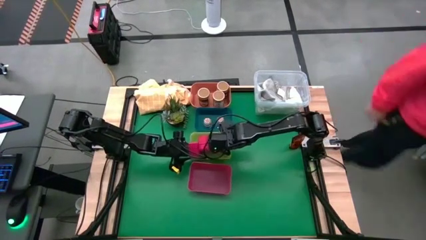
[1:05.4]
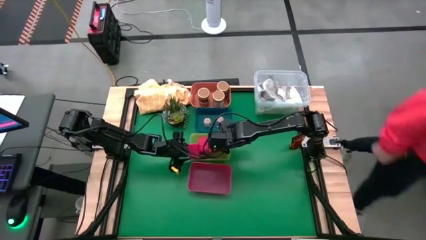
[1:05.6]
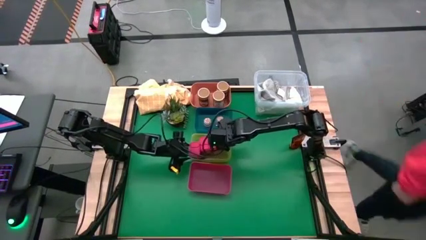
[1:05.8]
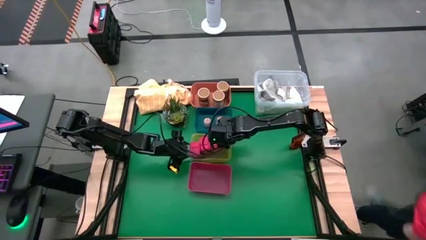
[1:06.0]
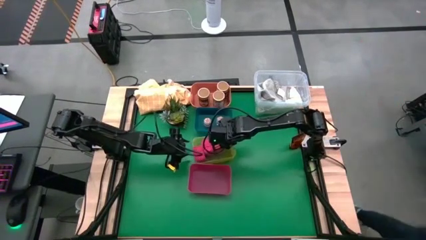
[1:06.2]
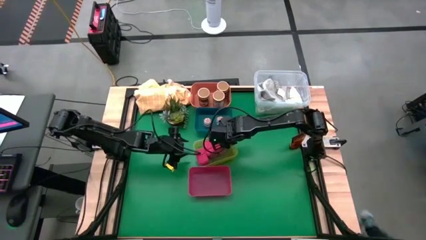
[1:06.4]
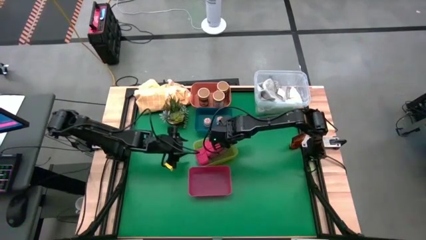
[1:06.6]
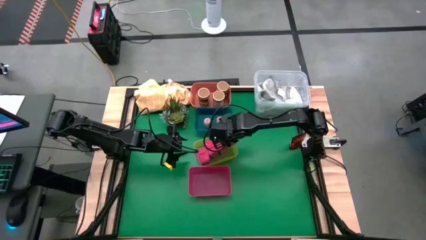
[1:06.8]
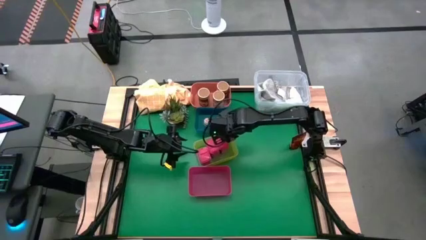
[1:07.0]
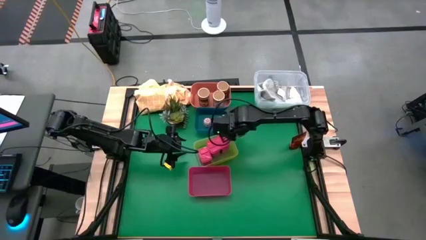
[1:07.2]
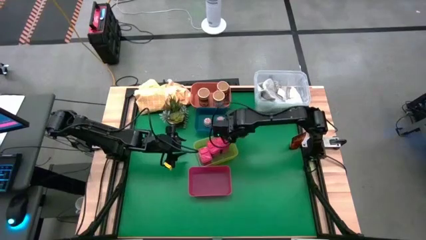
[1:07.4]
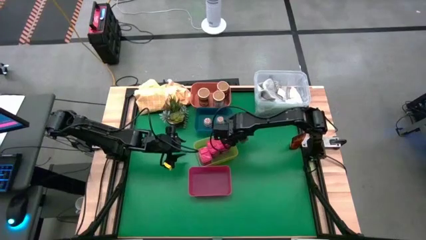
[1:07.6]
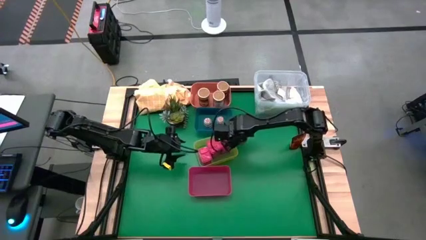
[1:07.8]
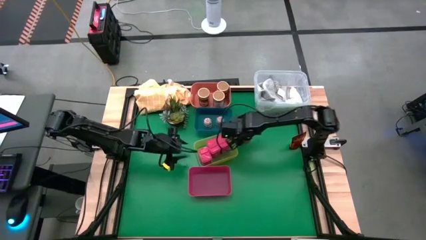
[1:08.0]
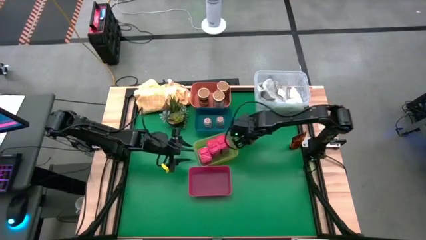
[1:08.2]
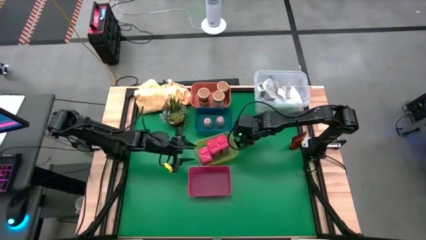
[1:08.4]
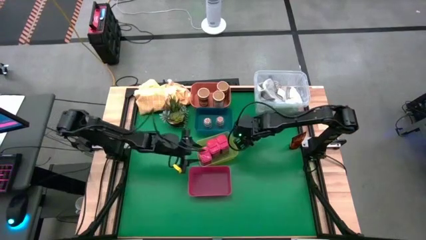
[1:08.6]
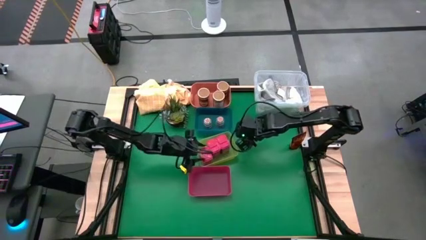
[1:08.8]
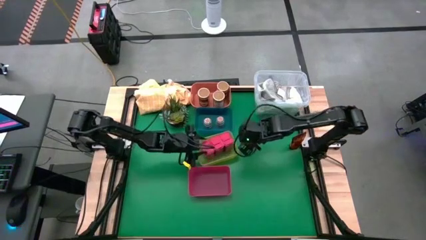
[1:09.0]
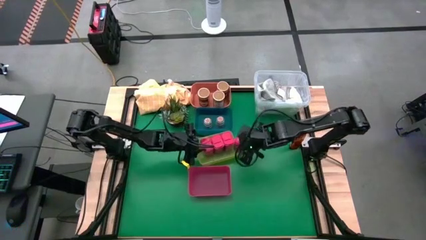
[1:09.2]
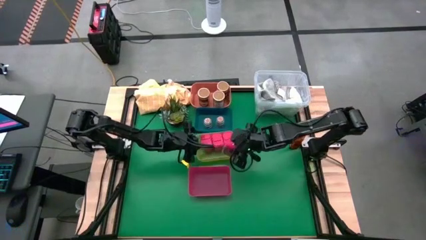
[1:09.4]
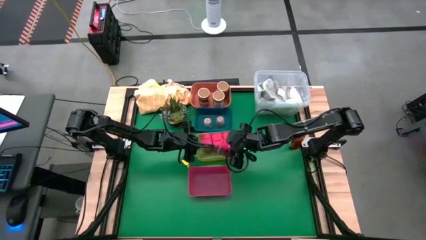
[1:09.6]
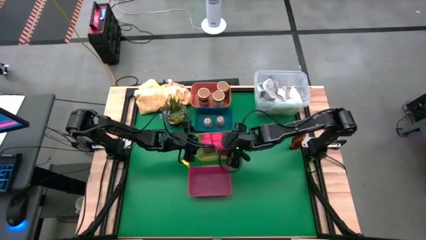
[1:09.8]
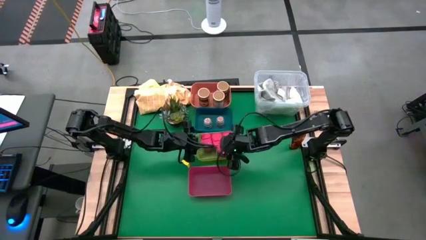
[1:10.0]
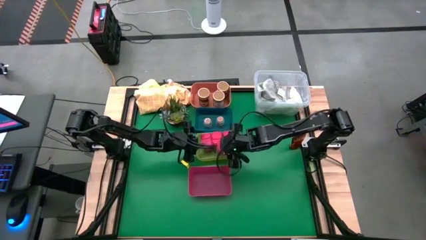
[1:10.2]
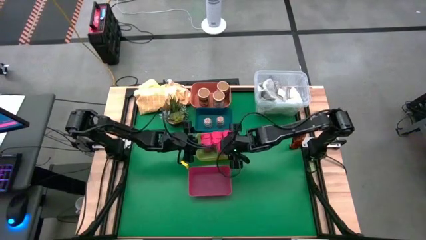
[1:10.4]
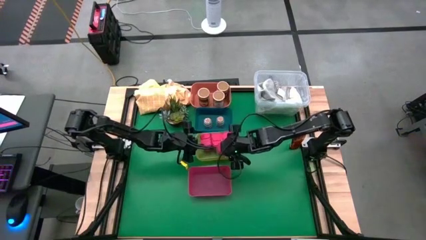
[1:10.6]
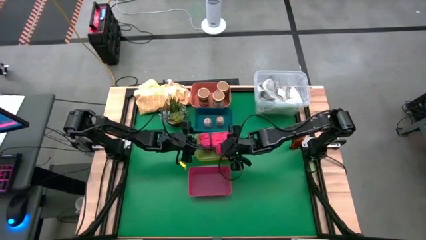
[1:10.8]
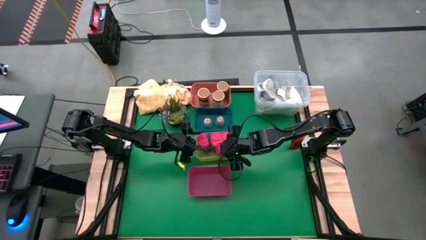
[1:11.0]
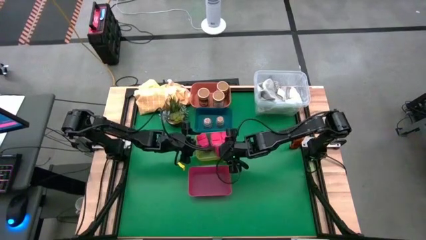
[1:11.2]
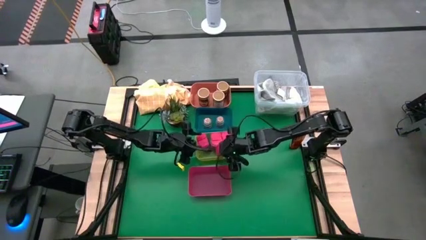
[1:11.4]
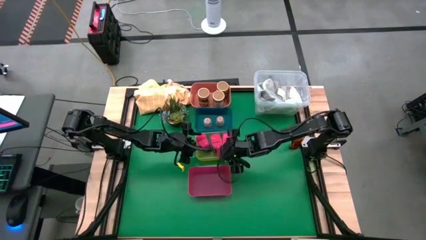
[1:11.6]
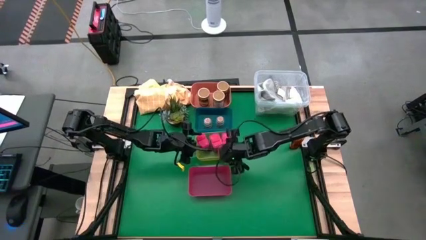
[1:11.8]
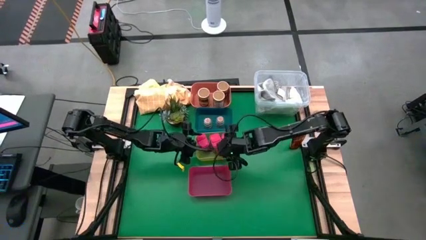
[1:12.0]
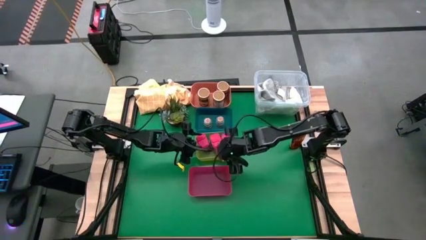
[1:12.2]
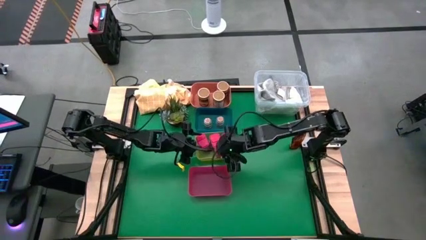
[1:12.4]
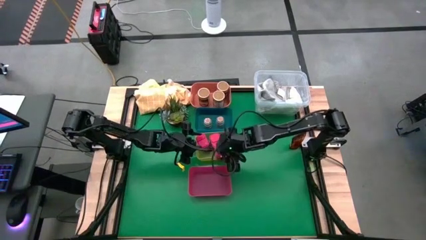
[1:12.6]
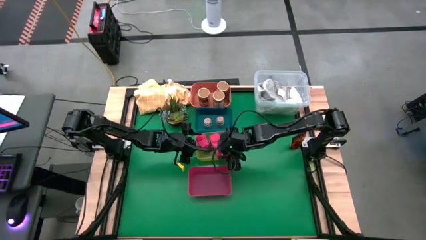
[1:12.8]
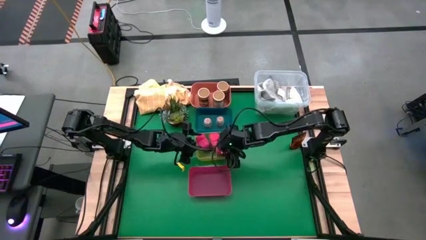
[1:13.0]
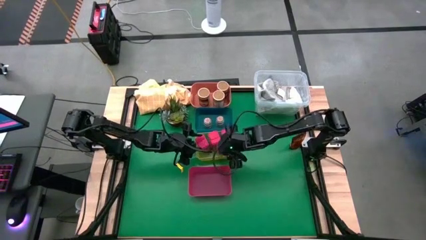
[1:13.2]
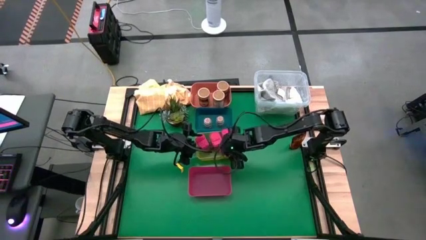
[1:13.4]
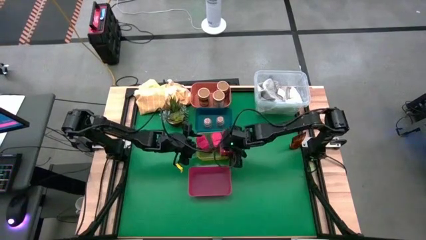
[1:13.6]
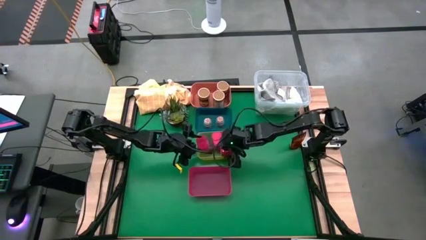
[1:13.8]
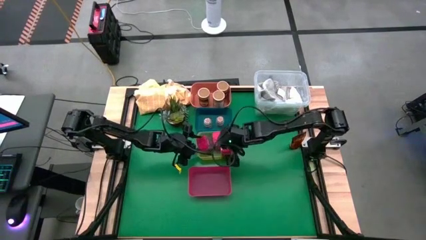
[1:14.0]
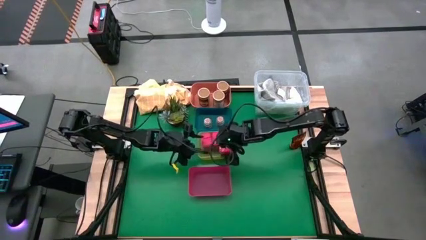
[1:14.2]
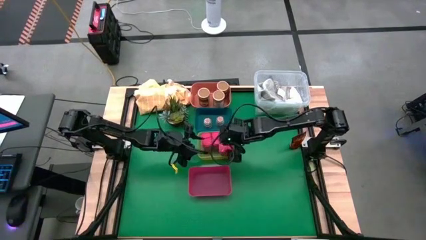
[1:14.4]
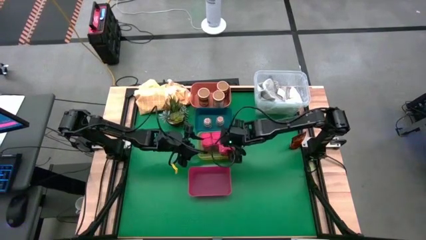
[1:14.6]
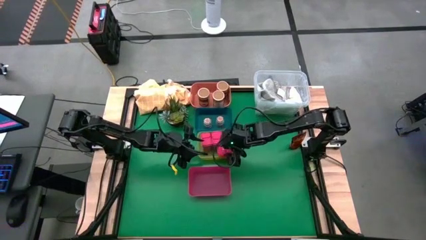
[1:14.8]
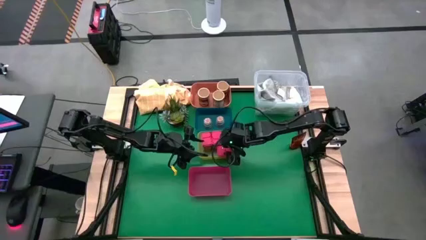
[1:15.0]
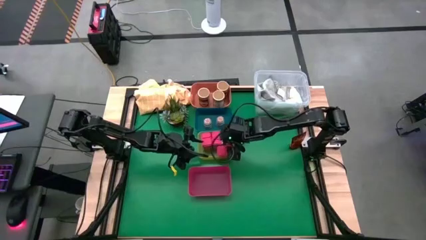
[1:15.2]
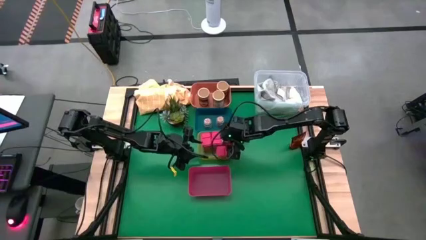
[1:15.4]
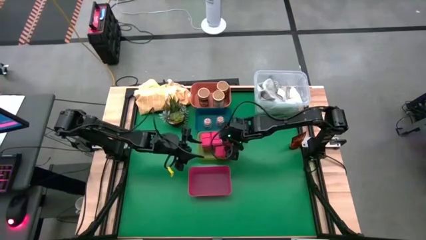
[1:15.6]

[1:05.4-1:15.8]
Task: Sort spices by type
Put the red spice can into the yellow bin

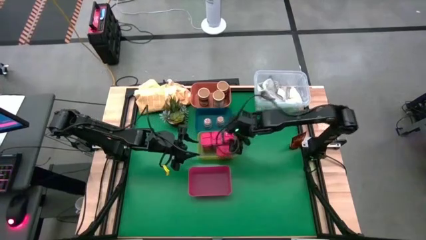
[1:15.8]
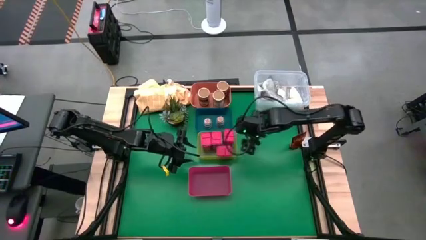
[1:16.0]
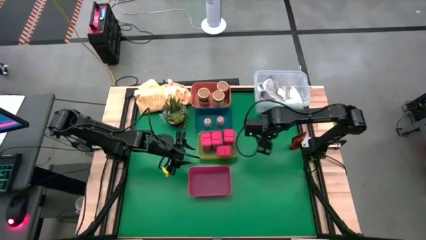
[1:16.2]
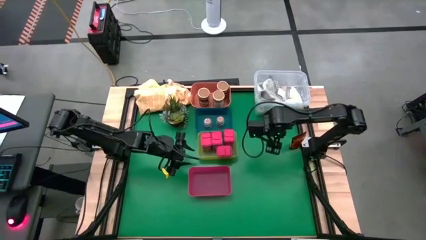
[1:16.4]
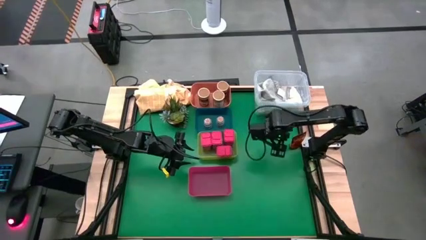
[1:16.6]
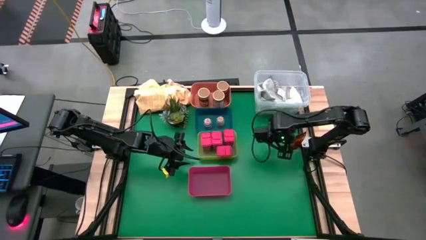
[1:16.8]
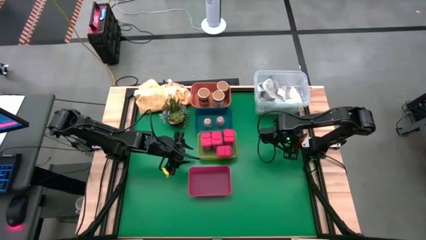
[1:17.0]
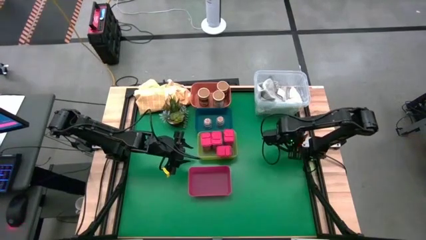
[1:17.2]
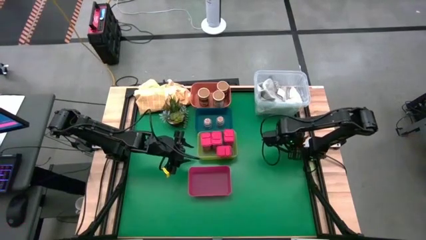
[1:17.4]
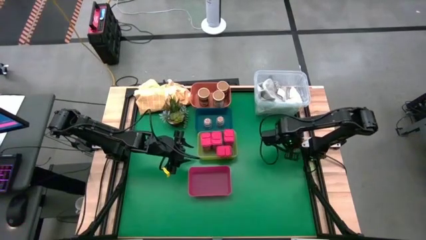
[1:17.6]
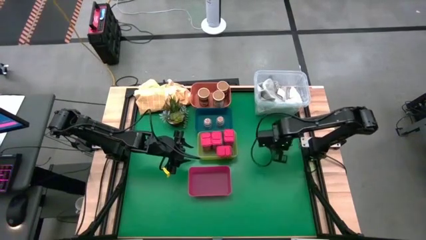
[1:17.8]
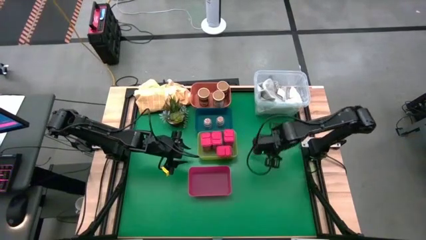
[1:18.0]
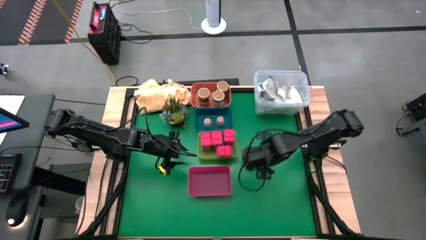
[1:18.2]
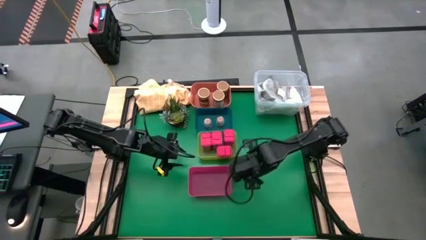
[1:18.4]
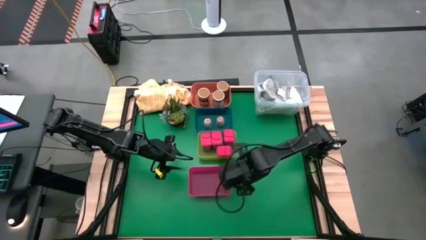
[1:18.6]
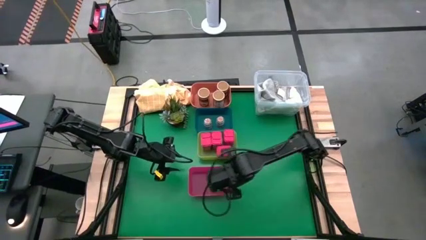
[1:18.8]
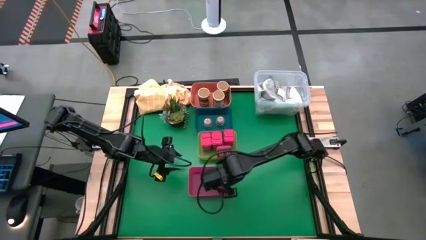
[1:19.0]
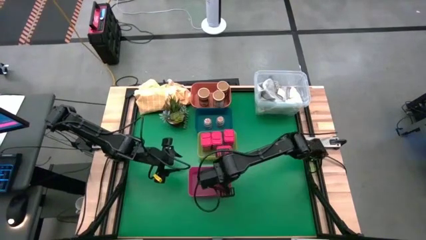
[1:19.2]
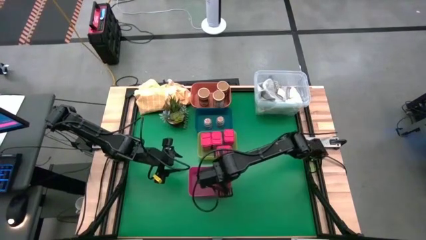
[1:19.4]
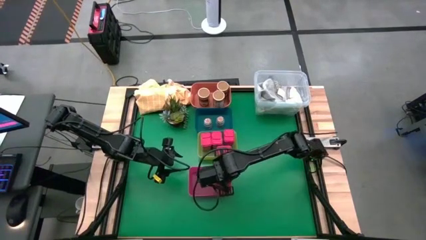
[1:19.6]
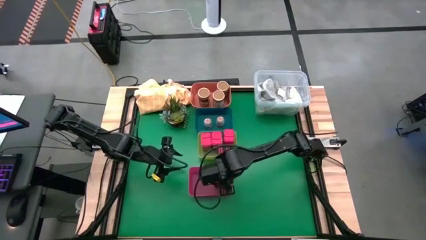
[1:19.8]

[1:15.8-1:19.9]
Put the orange spice bag into the red bin

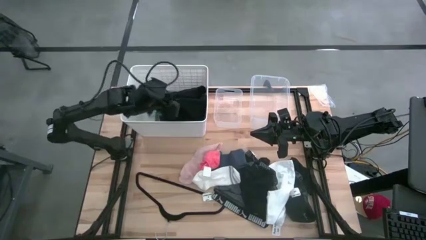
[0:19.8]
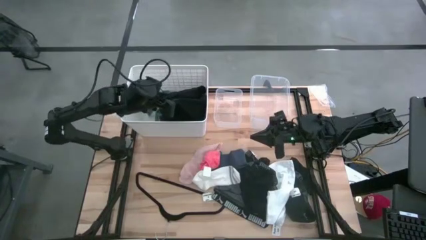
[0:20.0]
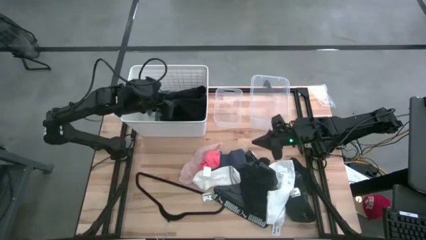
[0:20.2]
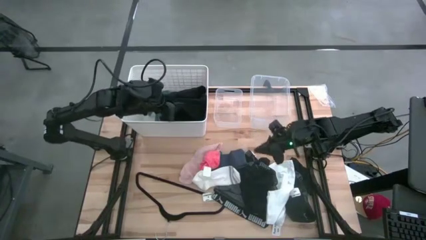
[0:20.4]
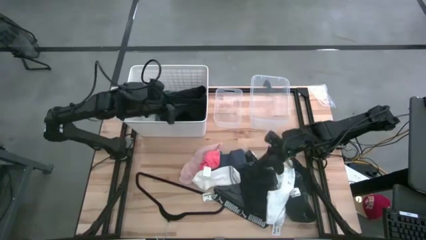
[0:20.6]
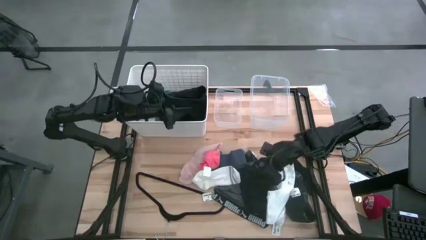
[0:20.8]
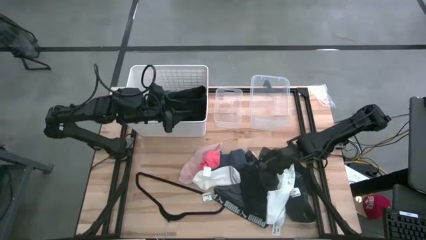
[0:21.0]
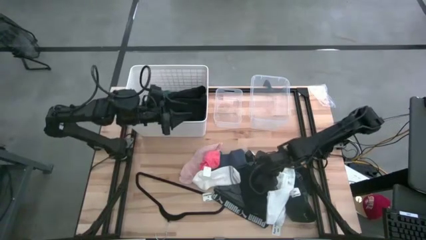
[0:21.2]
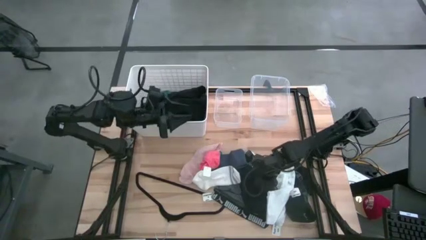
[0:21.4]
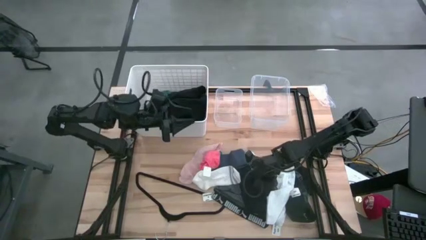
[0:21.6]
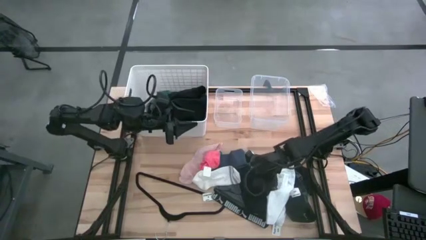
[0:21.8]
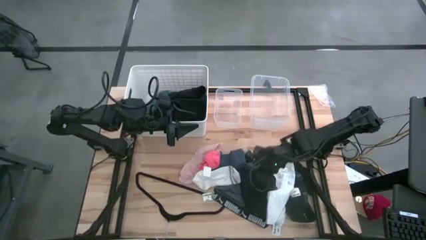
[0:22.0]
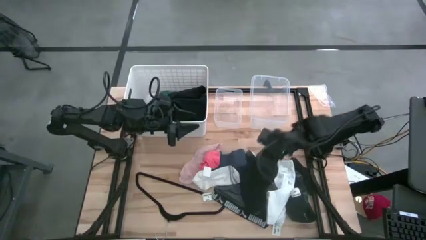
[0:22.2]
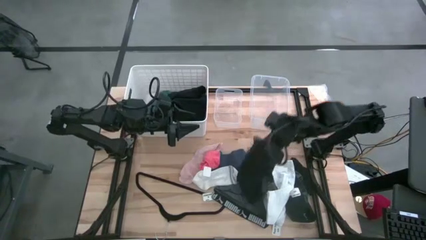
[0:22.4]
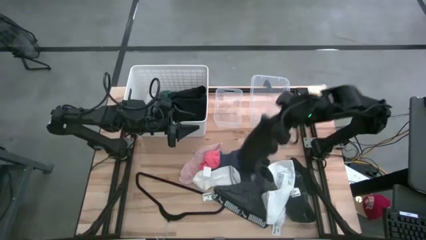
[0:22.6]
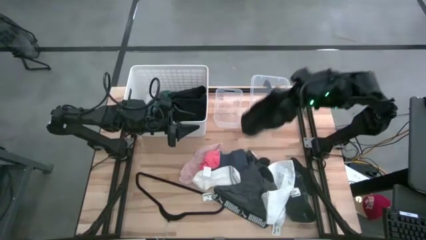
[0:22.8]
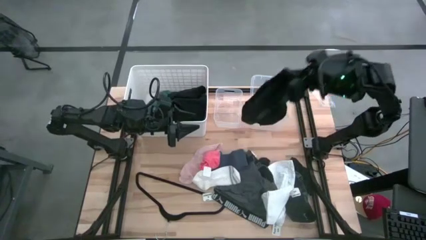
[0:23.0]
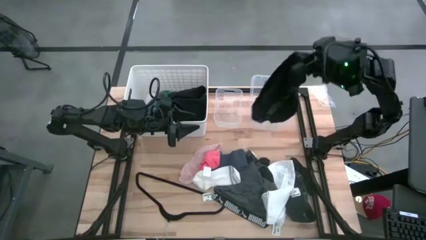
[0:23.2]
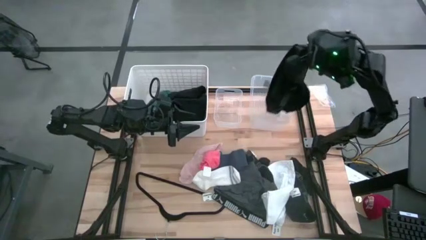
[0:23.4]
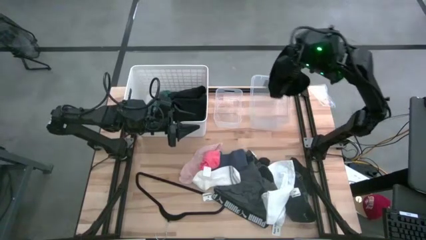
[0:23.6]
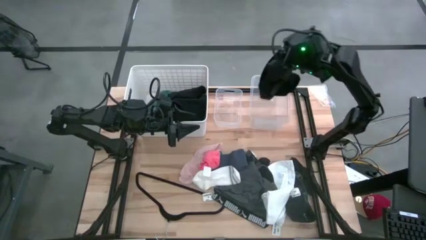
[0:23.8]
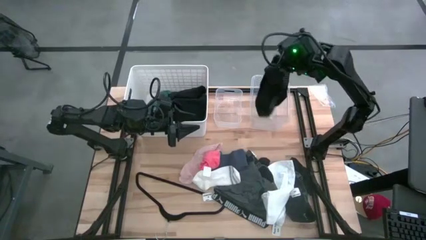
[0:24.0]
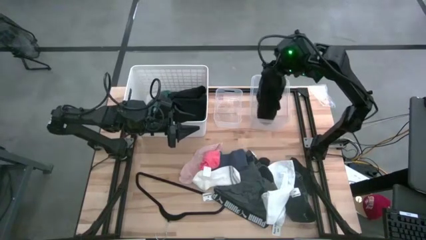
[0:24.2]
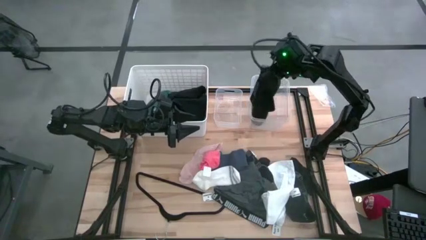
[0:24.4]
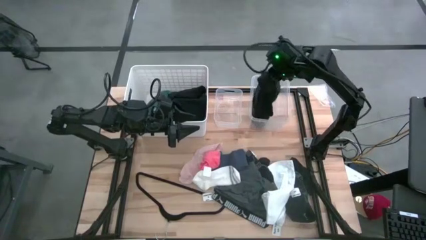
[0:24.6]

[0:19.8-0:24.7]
Task: Pick & Place Cloths
Put the black boxer into the large transparent bin
